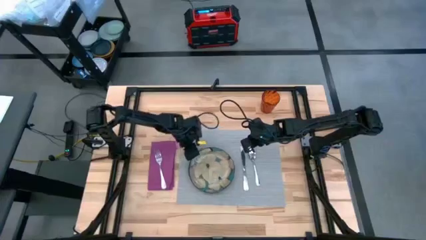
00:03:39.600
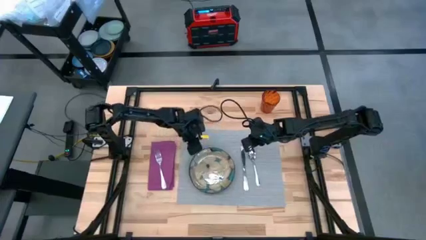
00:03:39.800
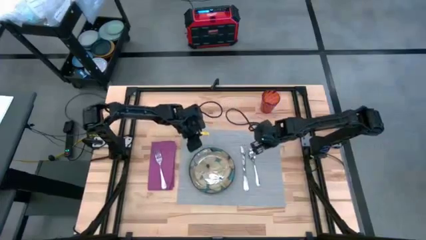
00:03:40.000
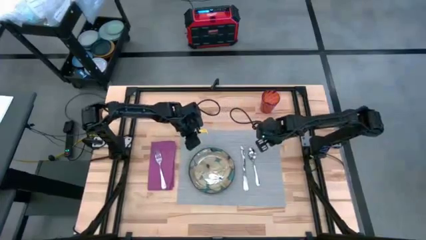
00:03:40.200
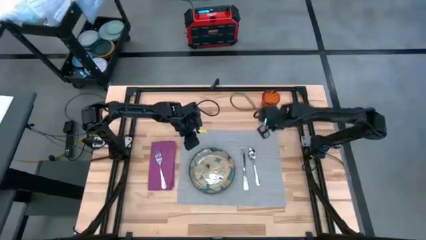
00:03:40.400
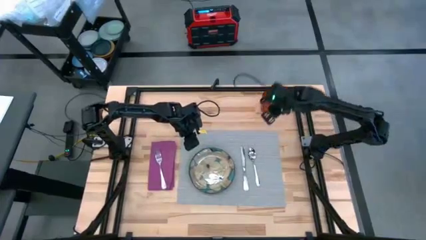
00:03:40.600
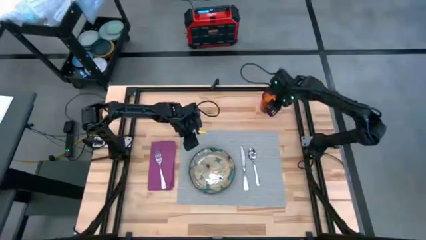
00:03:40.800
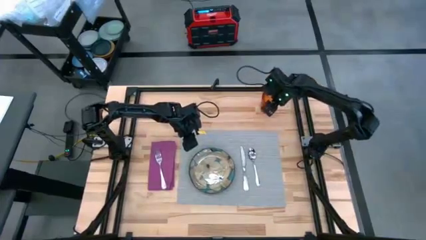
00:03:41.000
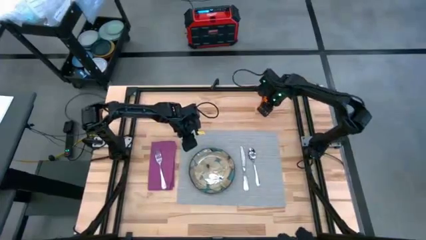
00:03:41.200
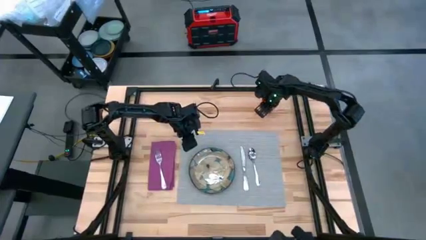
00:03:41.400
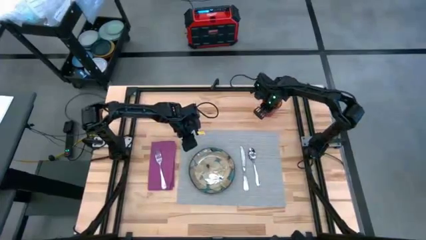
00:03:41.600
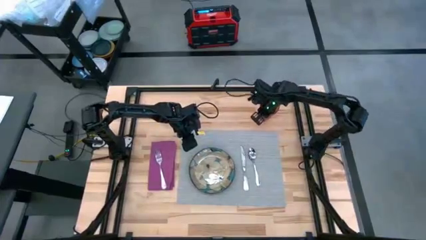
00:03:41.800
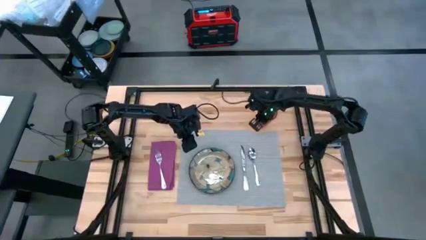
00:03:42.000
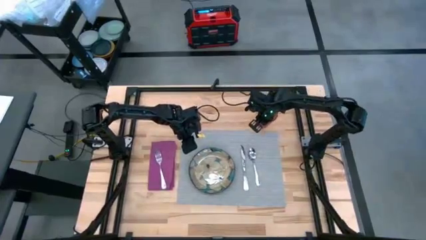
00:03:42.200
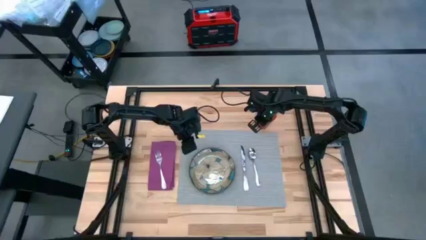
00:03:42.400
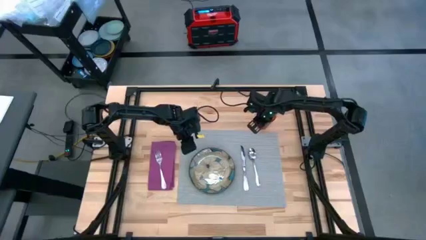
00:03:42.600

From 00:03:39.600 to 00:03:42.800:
Task: Set table place
Adjust the orange cup on top of the gray placemat

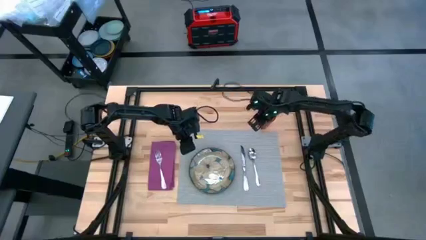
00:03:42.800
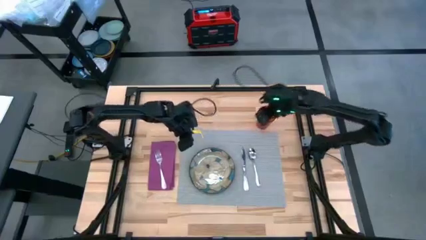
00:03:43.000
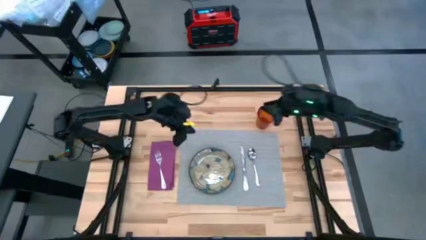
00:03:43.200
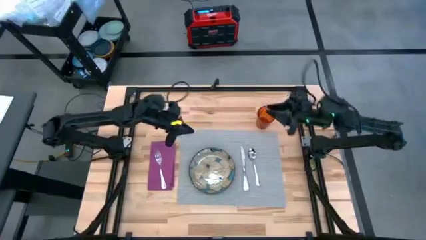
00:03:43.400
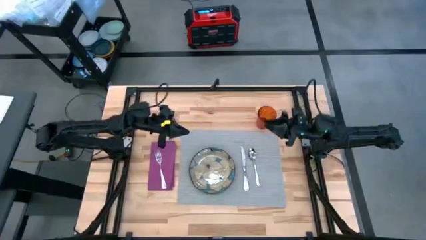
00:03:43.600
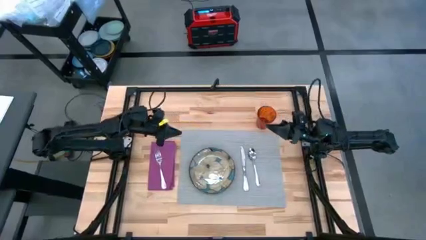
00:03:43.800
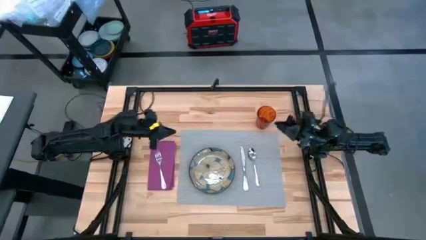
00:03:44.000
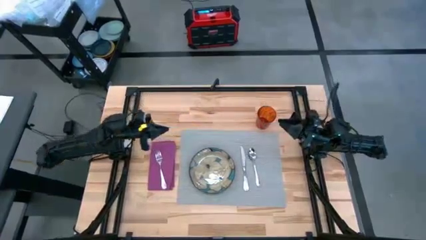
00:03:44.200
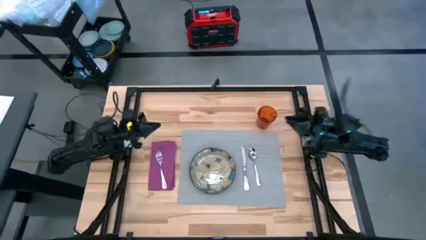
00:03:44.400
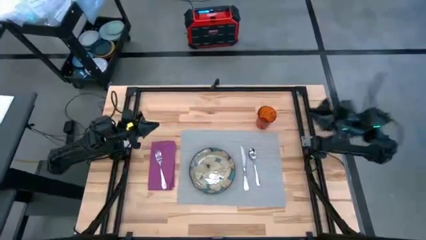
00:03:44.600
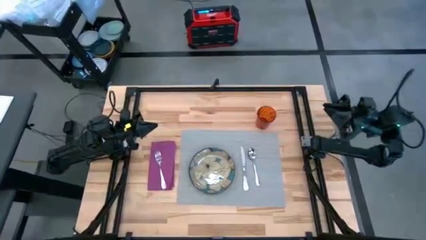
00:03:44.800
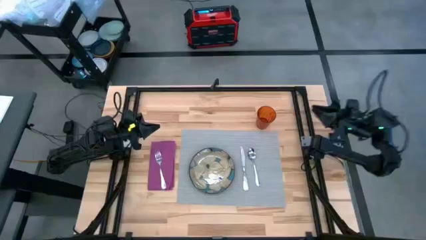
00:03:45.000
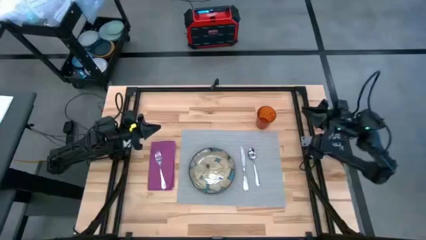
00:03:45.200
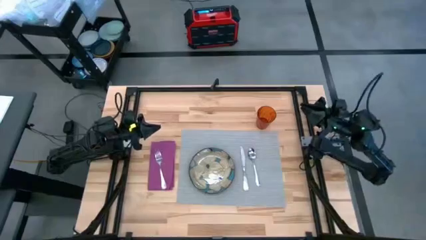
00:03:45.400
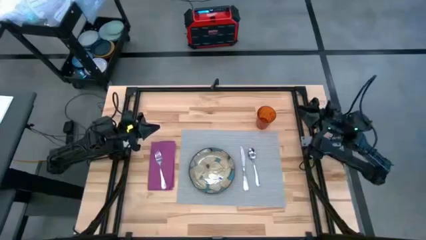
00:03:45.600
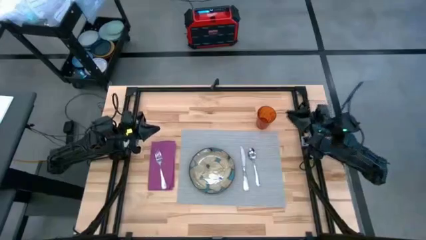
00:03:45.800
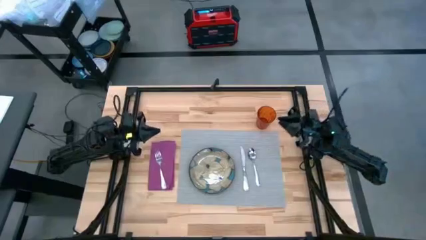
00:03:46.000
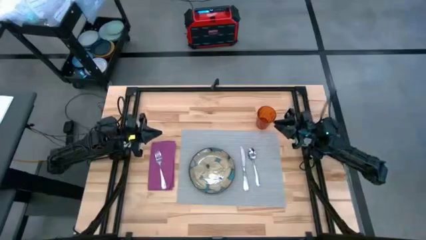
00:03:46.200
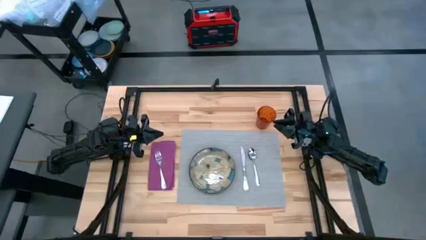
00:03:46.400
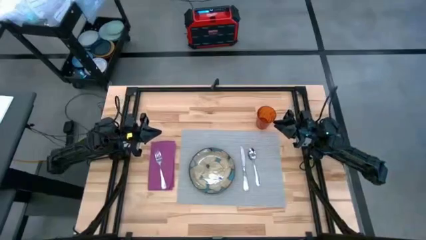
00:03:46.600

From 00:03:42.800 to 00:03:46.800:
Return to Home Position
